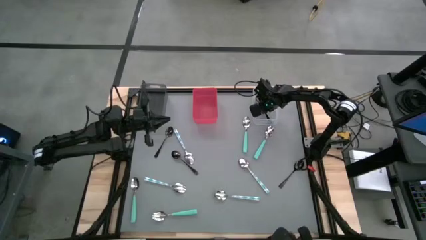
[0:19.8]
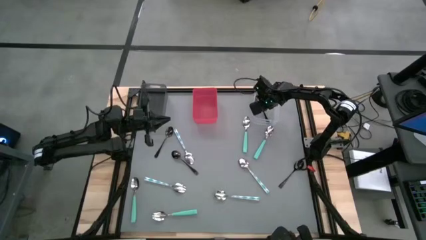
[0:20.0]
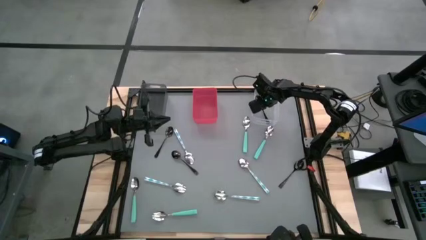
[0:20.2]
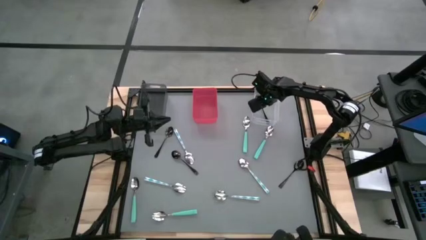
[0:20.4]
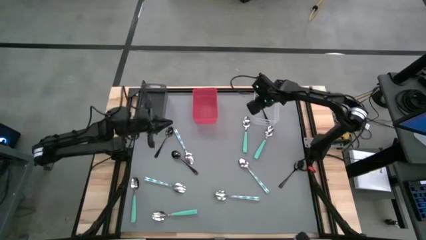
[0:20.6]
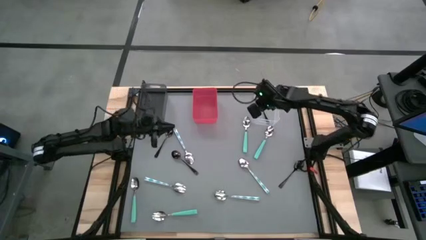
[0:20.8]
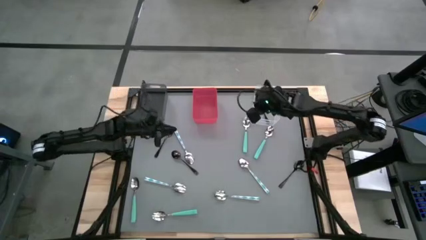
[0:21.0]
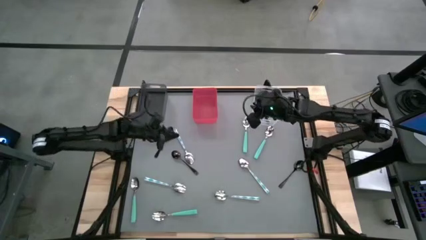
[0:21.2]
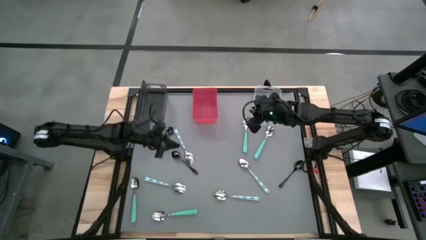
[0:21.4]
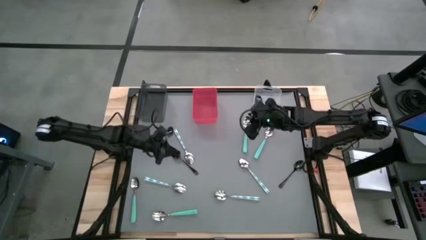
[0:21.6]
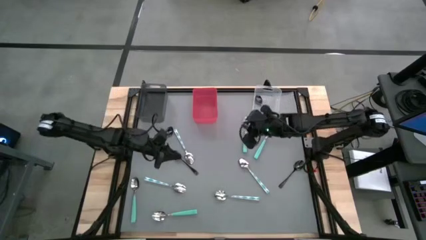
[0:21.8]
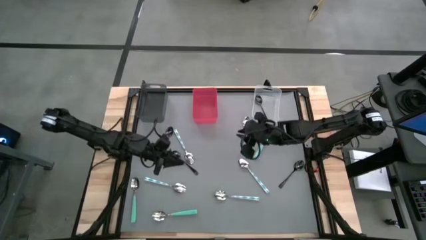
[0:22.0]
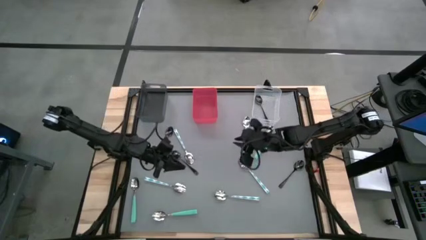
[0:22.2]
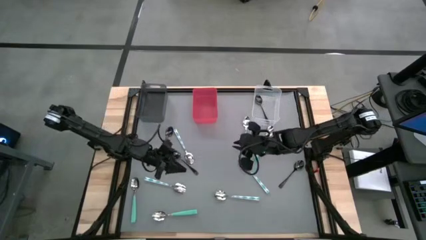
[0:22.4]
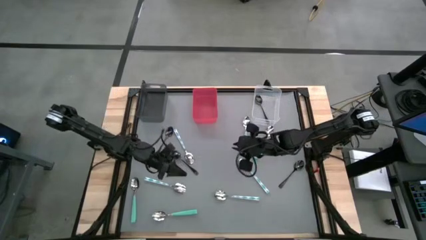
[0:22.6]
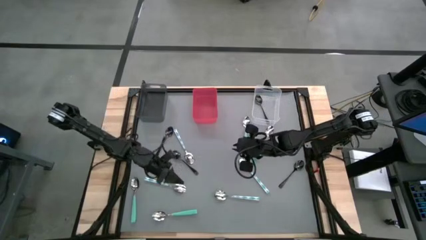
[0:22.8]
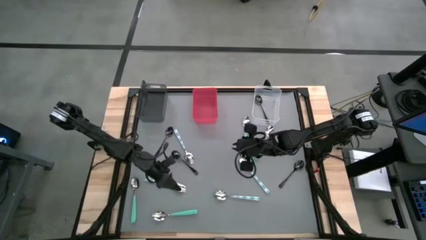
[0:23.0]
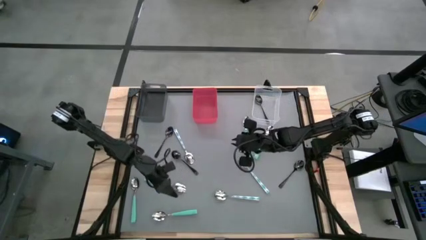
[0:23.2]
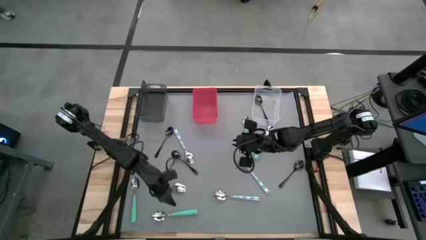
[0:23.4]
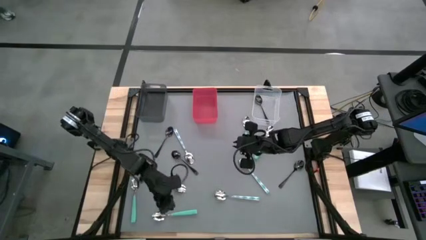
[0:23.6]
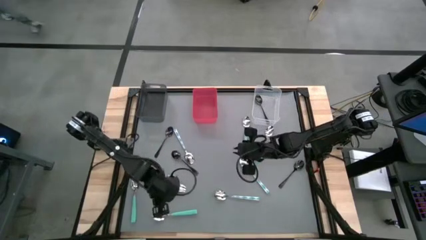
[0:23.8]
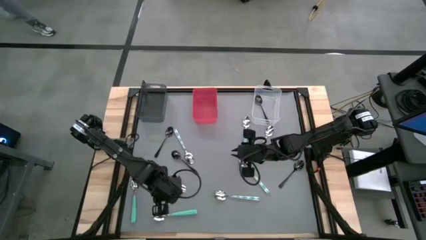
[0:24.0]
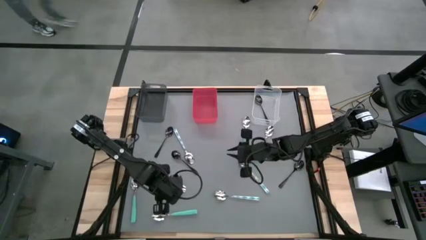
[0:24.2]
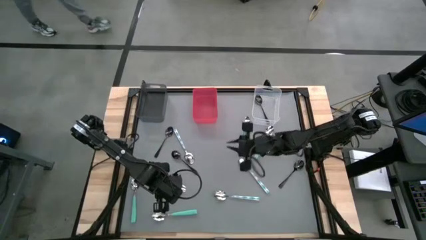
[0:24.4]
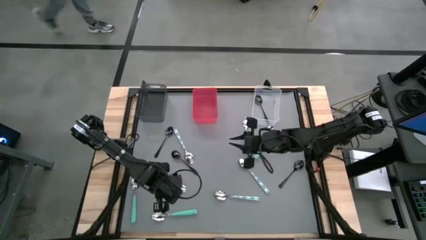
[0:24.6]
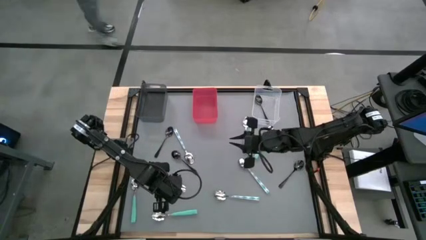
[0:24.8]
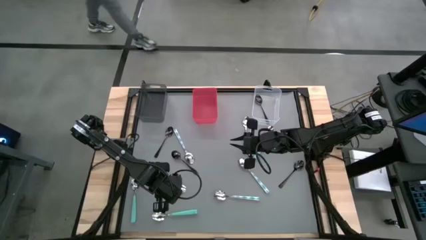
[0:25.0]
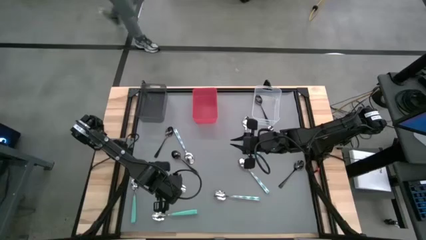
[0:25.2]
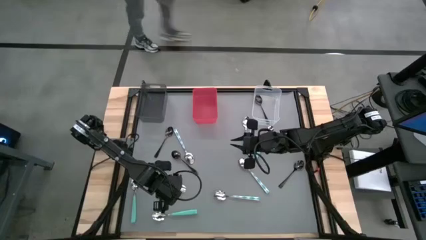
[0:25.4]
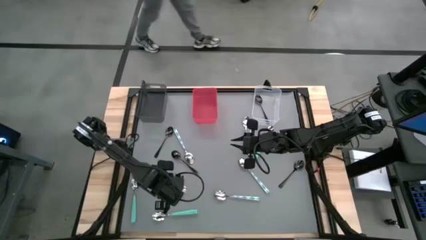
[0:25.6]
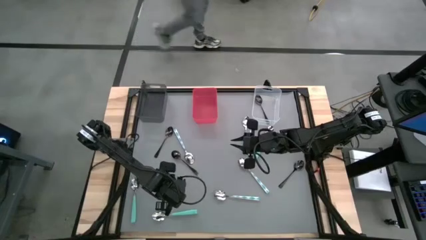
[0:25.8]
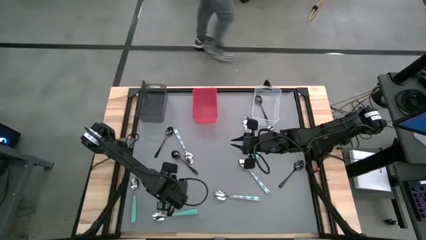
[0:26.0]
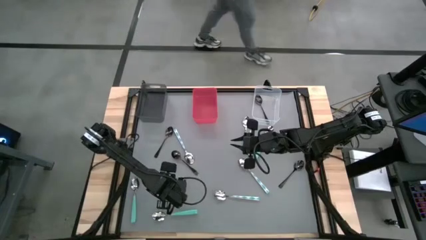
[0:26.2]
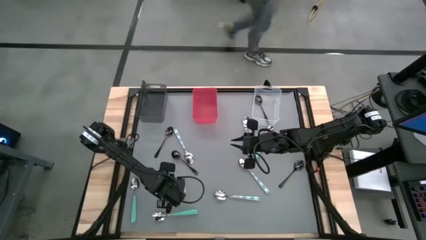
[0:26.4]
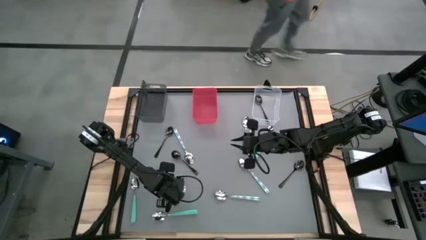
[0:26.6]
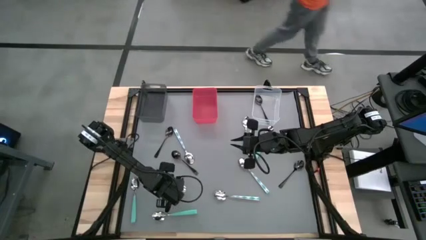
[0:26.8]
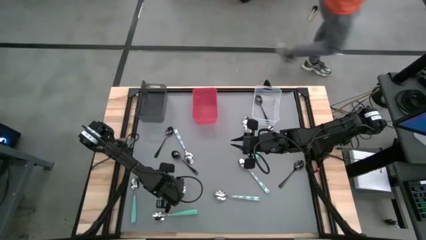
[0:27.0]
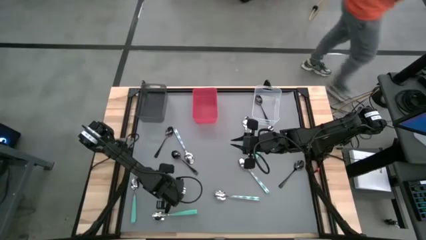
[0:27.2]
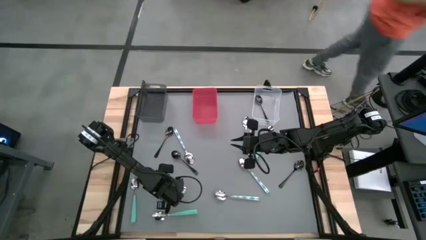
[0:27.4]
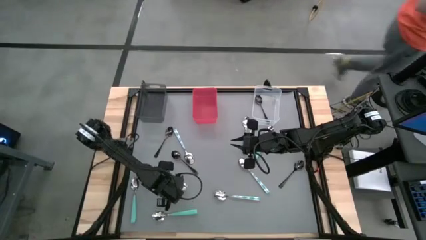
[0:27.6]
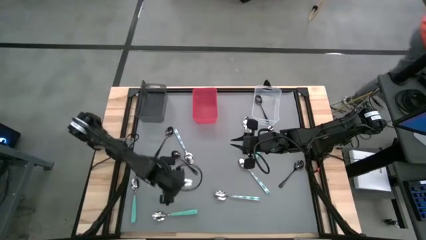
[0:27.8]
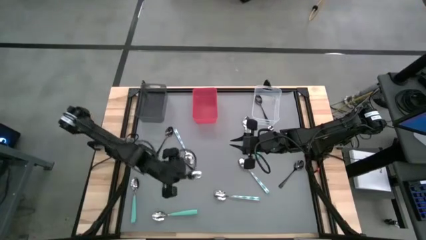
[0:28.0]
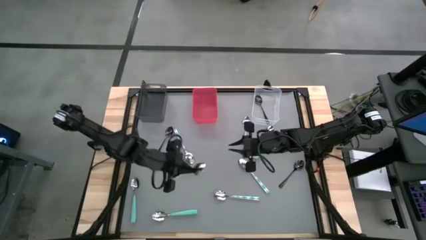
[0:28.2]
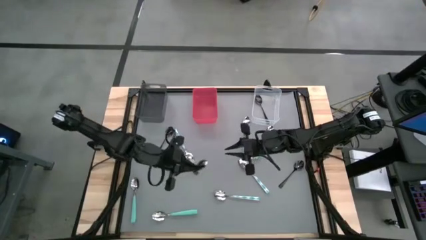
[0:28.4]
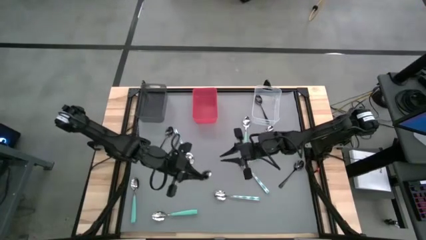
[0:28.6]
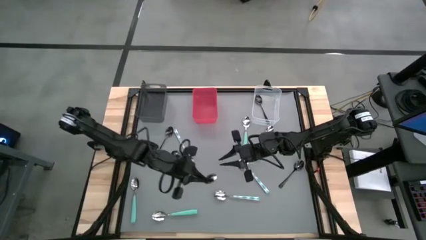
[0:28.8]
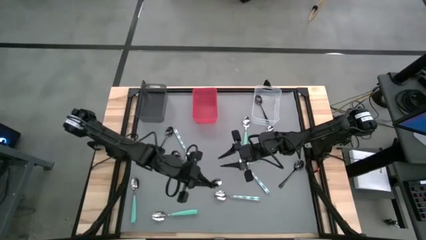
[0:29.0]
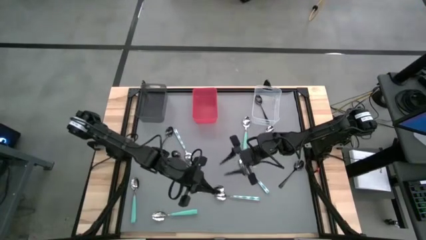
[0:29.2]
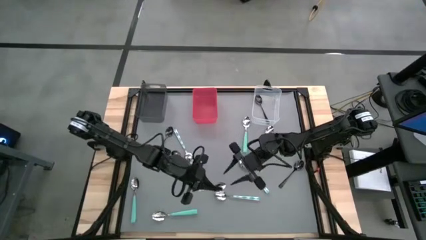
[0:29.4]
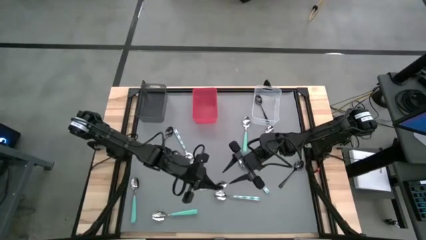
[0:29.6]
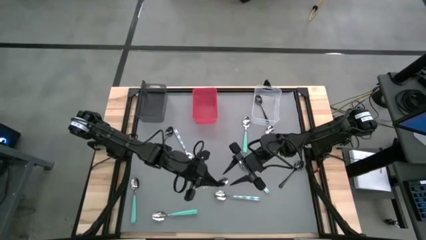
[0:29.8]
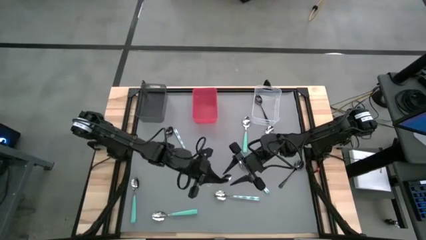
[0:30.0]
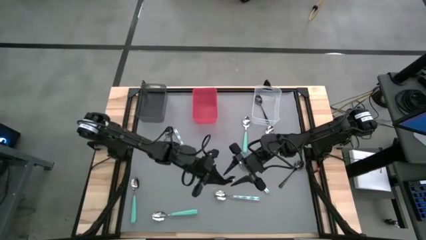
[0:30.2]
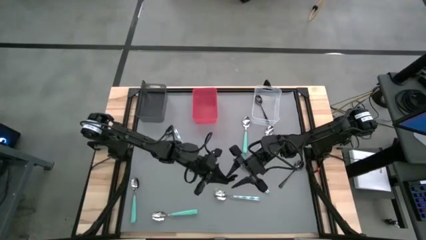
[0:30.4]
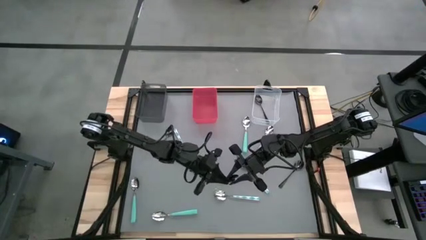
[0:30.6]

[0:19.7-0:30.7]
Task: Sort silverware by color (type)
Put the blue patterned spoon into the black bin

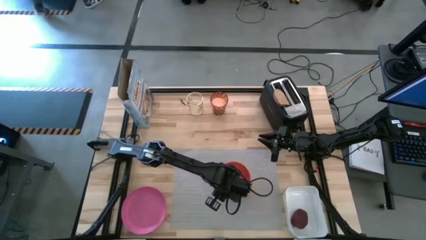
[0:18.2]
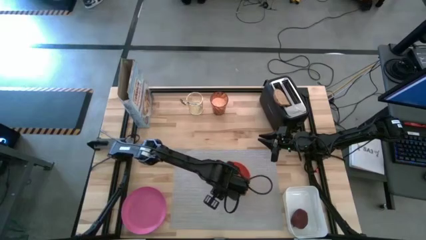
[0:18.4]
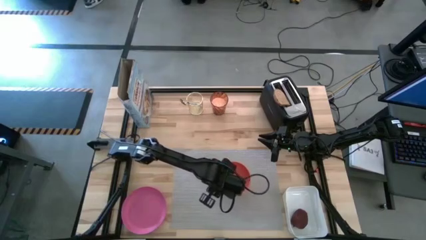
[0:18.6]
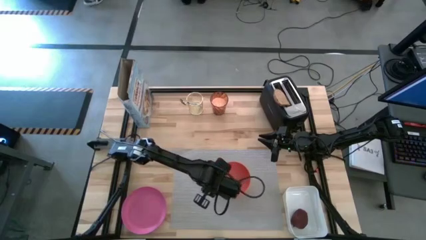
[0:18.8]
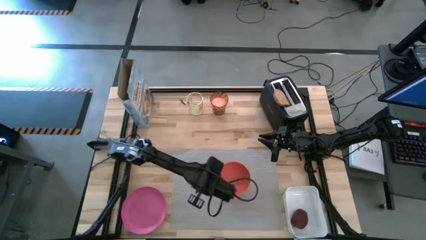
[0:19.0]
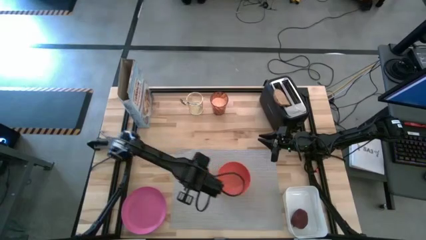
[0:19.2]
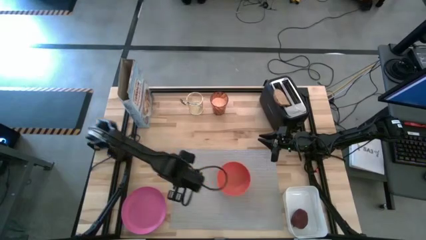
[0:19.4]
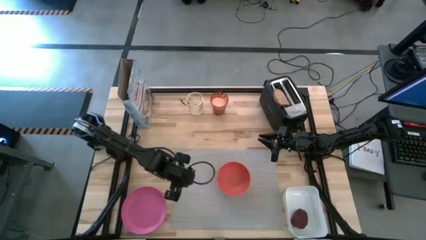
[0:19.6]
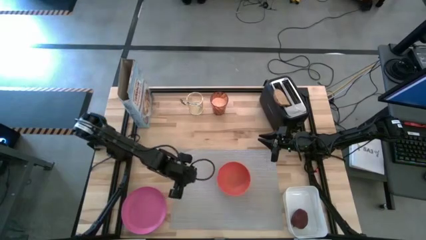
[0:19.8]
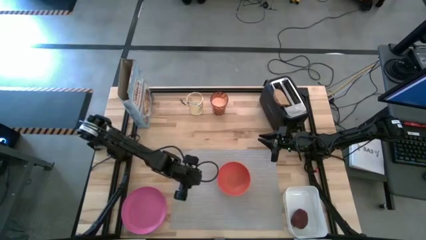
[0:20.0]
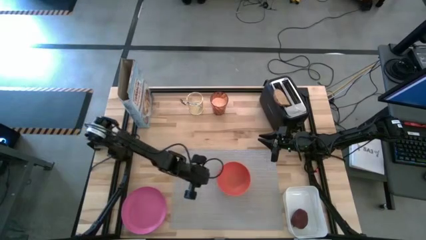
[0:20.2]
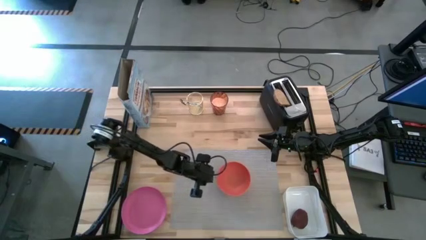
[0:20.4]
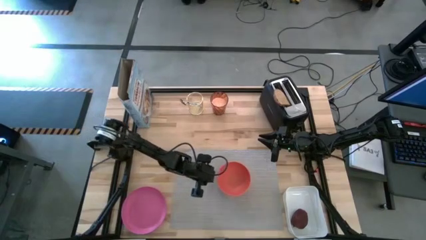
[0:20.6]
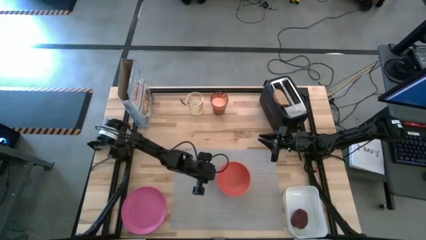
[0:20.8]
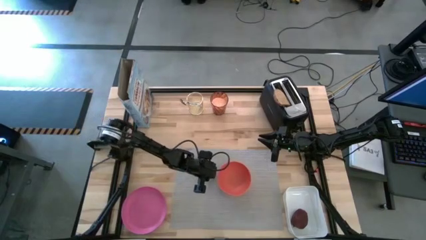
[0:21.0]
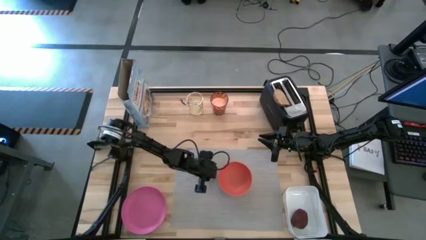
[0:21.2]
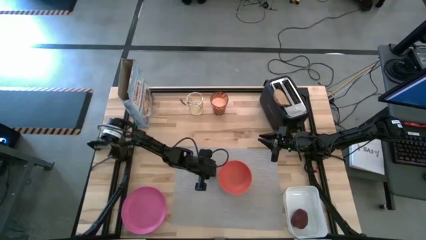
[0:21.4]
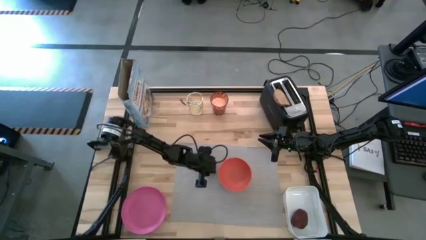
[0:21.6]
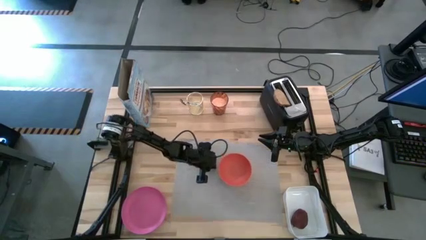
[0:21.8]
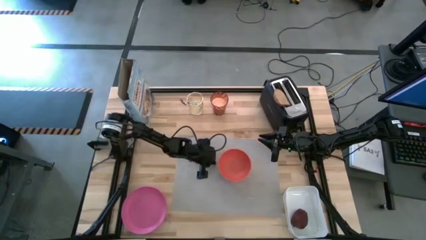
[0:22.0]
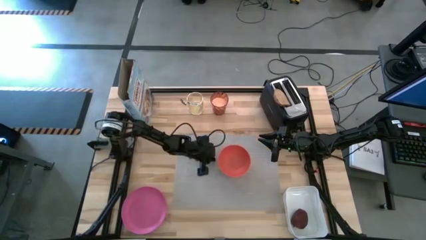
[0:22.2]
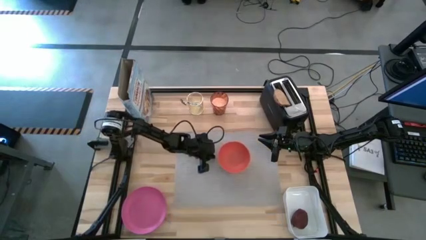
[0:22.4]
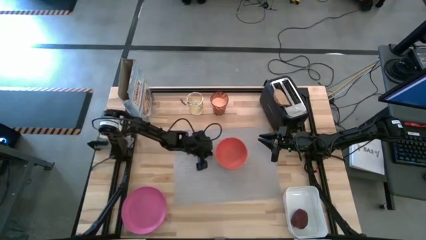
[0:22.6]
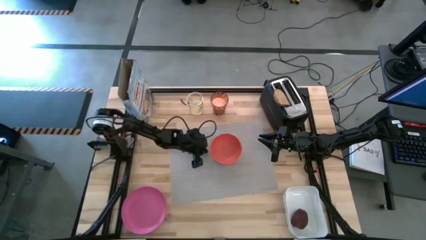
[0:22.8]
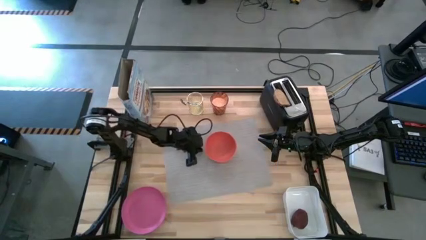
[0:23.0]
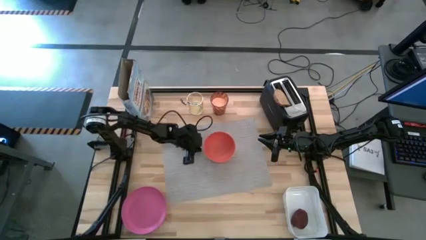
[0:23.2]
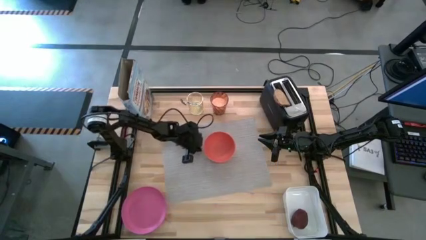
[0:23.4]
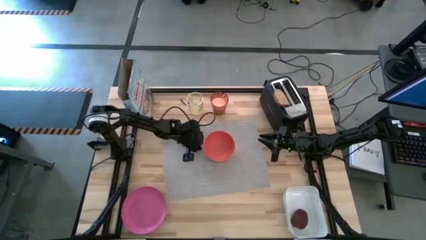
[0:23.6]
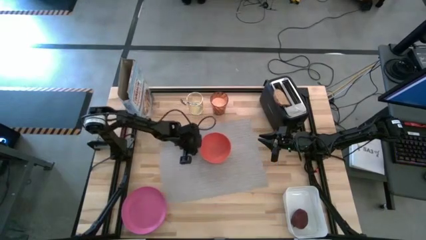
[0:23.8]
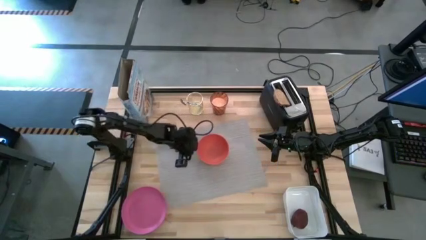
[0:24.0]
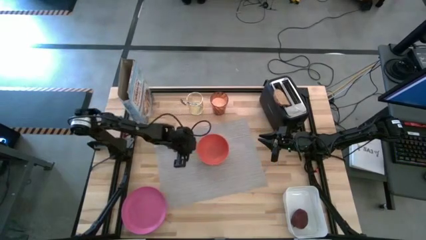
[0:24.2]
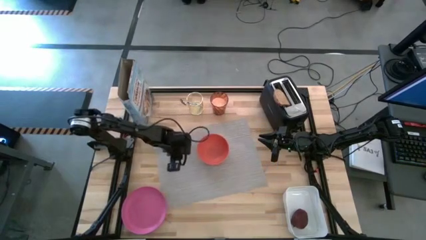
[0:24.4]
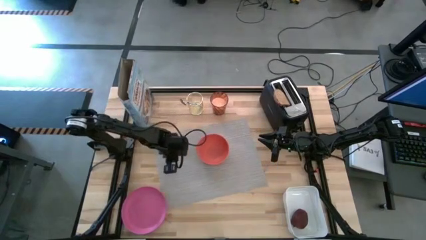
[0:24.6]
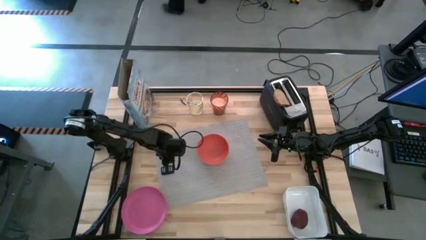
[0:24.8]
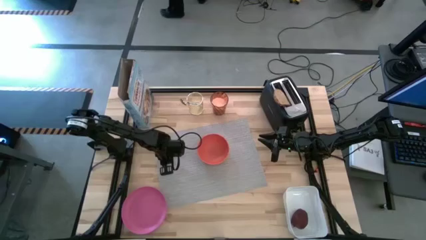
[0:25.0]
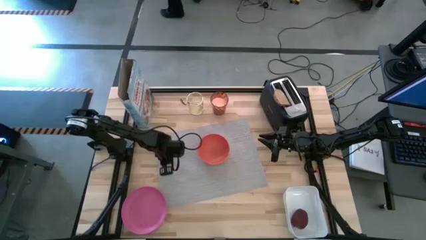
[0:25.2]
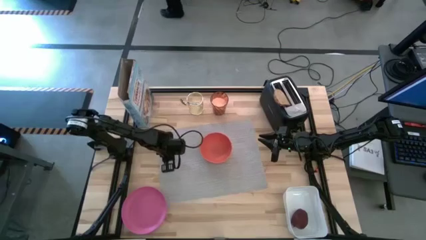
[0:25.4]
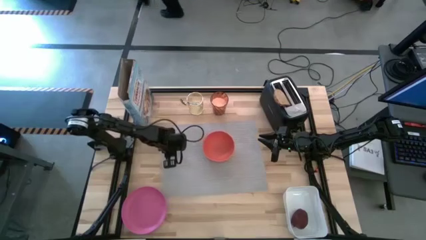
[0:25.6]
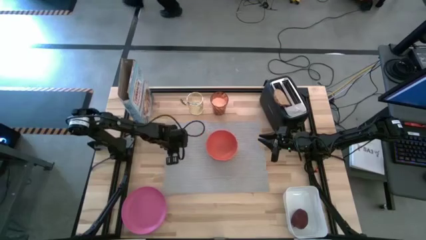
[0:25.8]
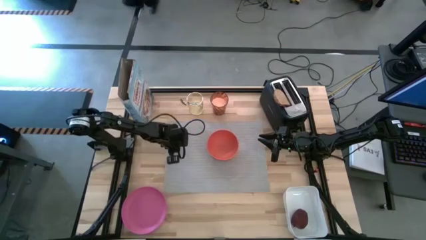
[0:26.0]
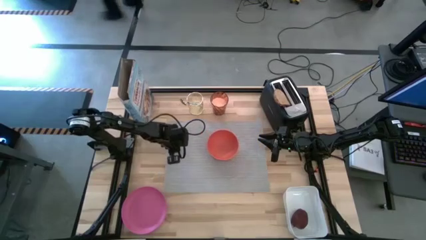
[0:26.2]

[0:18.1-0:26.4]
Task: Arrange a breakfast setting
Move the gray placemat to the center of the table
